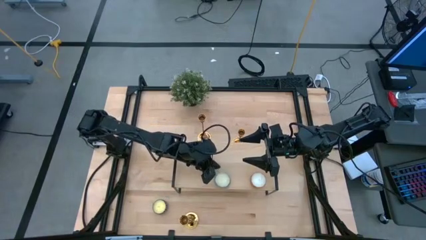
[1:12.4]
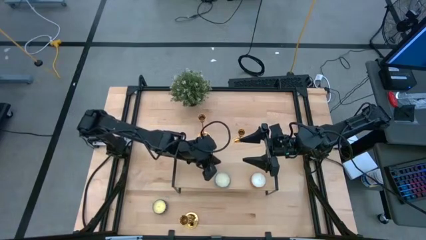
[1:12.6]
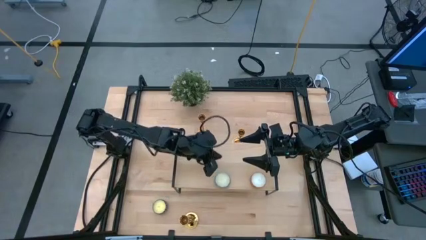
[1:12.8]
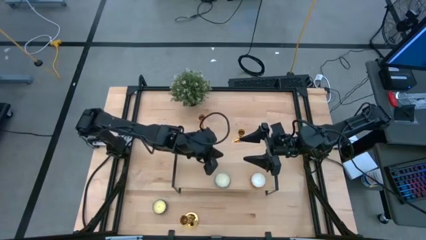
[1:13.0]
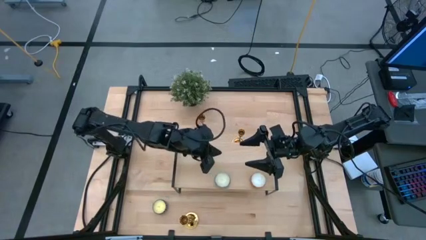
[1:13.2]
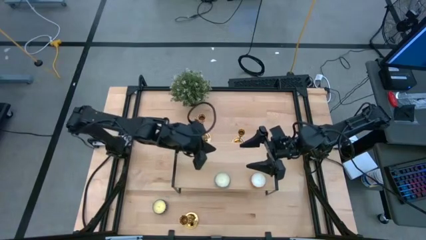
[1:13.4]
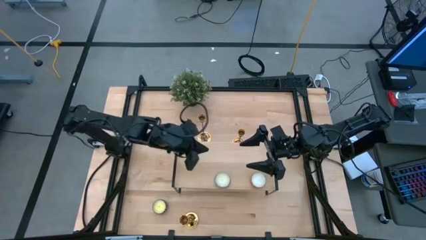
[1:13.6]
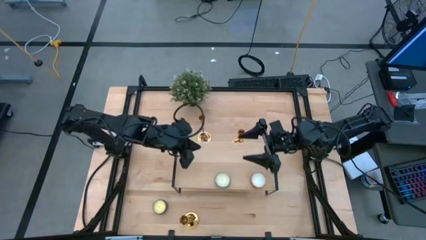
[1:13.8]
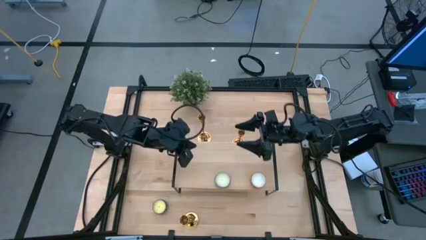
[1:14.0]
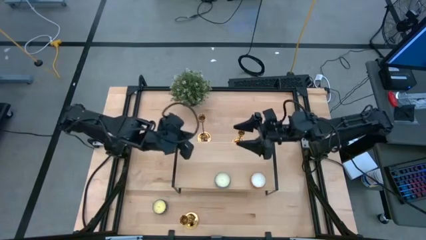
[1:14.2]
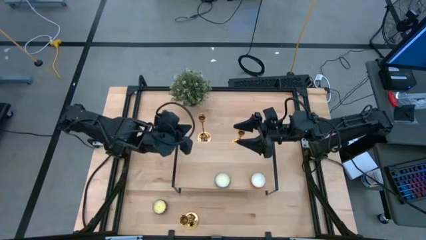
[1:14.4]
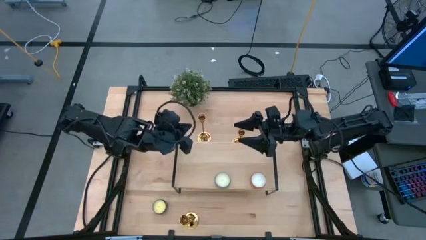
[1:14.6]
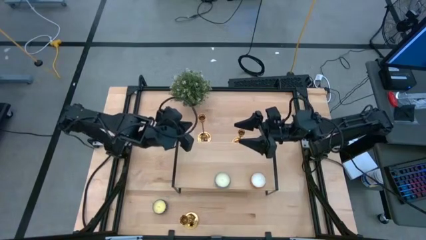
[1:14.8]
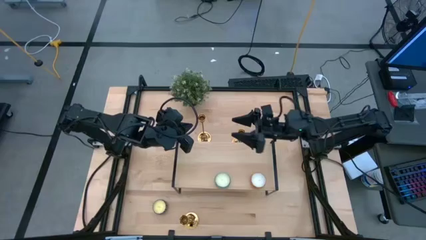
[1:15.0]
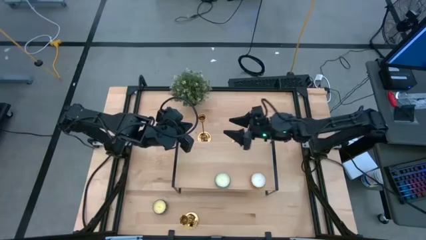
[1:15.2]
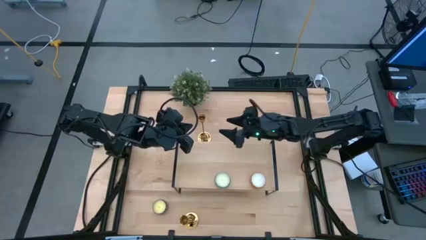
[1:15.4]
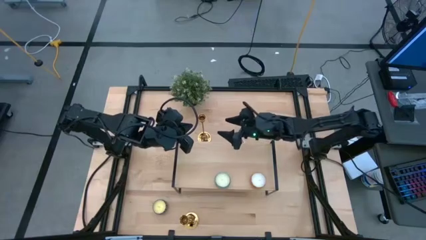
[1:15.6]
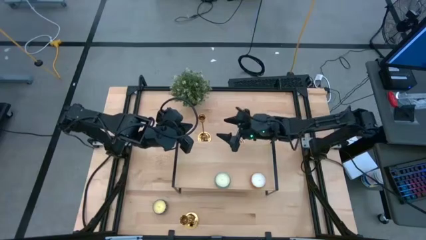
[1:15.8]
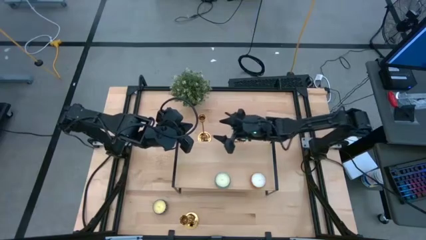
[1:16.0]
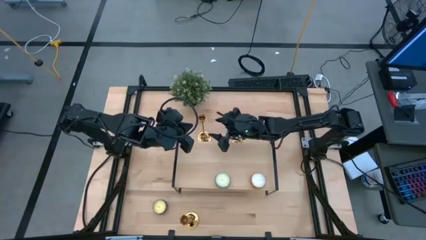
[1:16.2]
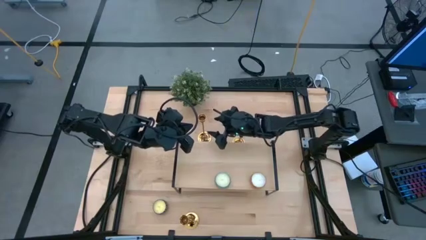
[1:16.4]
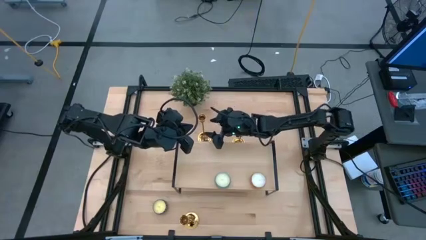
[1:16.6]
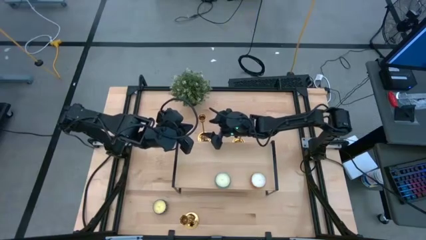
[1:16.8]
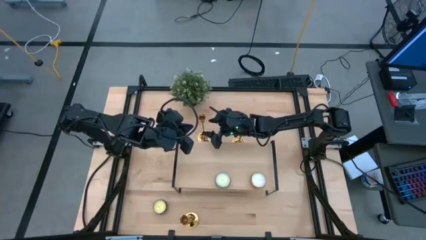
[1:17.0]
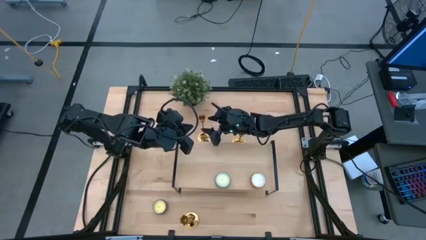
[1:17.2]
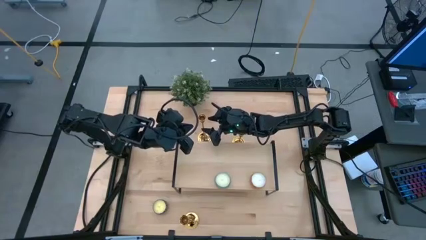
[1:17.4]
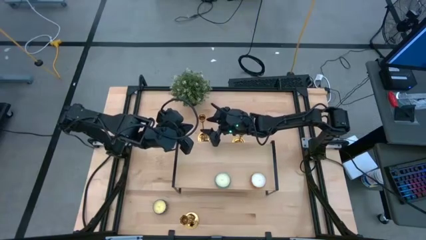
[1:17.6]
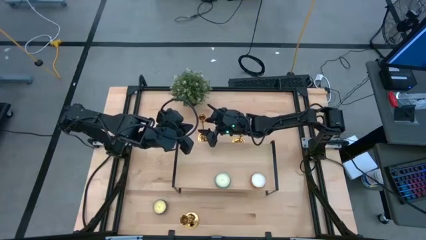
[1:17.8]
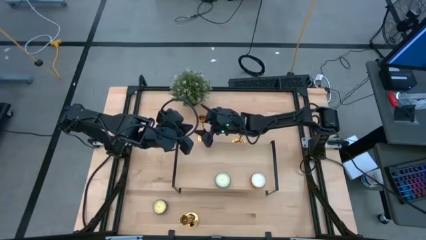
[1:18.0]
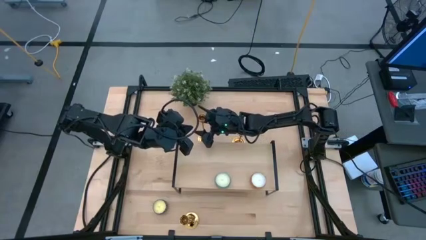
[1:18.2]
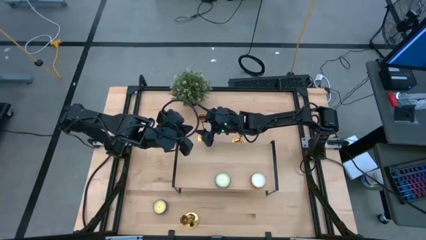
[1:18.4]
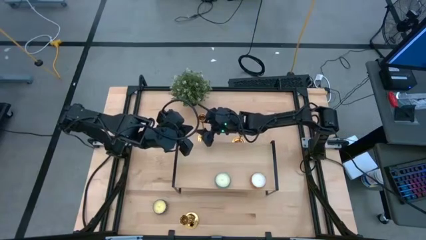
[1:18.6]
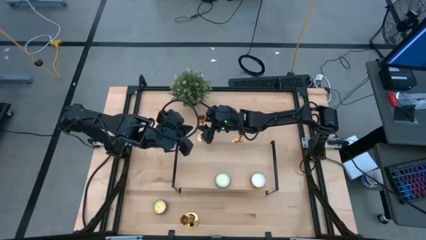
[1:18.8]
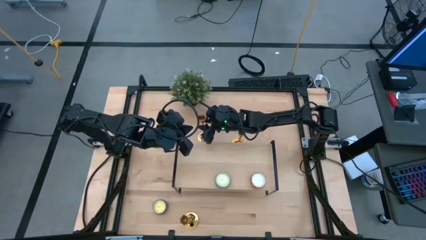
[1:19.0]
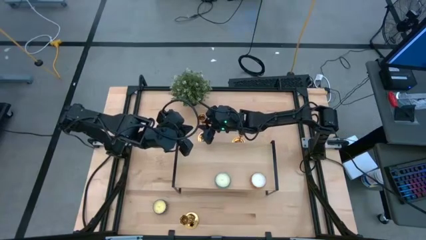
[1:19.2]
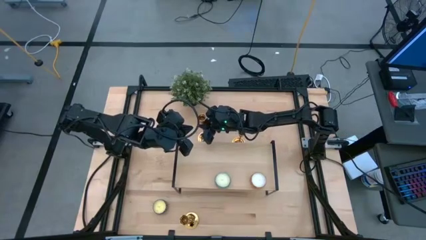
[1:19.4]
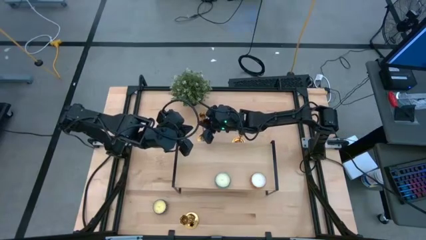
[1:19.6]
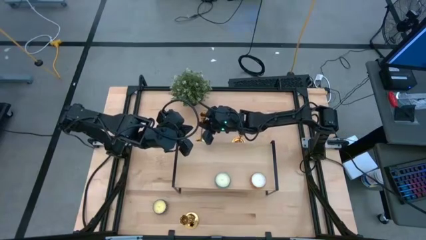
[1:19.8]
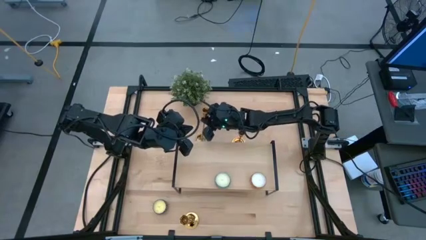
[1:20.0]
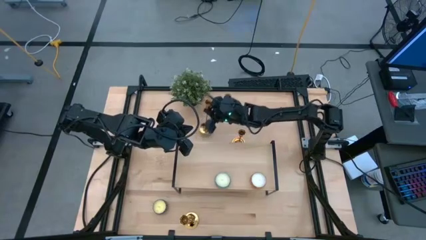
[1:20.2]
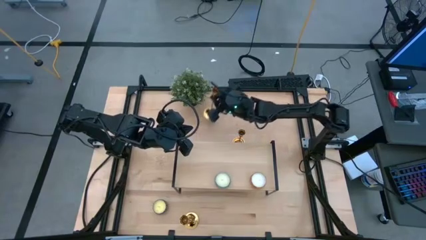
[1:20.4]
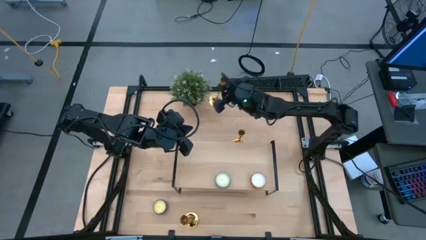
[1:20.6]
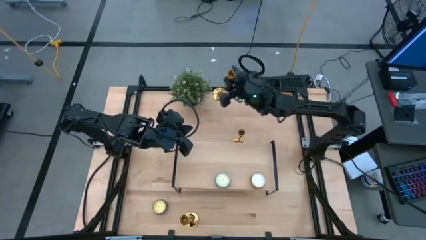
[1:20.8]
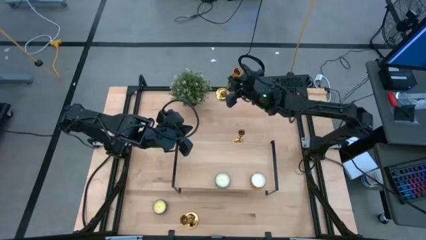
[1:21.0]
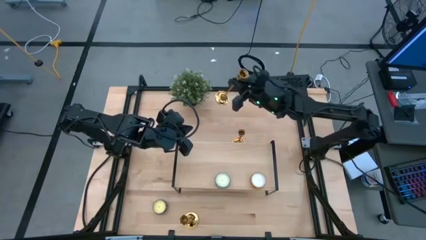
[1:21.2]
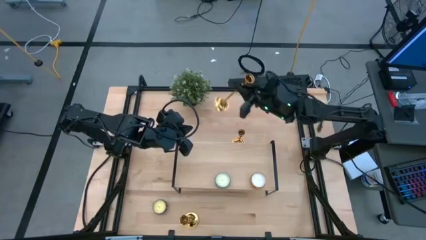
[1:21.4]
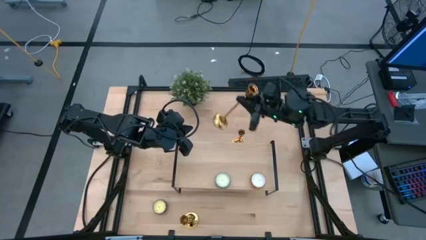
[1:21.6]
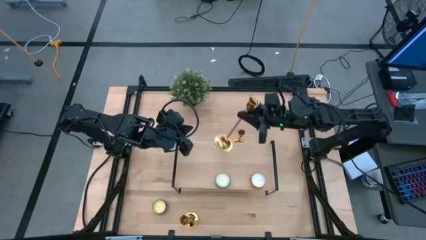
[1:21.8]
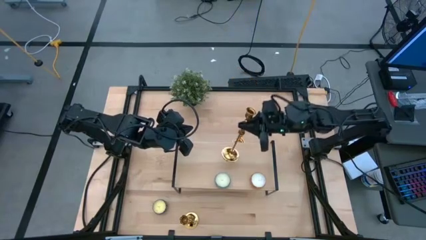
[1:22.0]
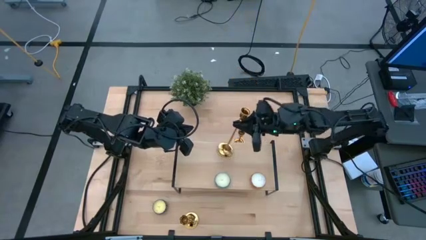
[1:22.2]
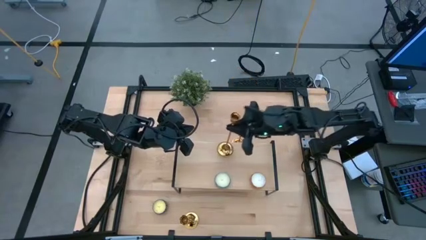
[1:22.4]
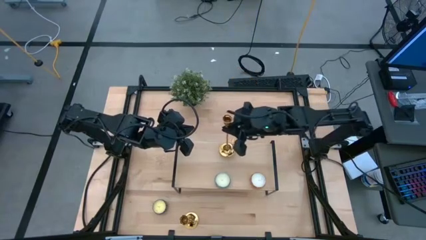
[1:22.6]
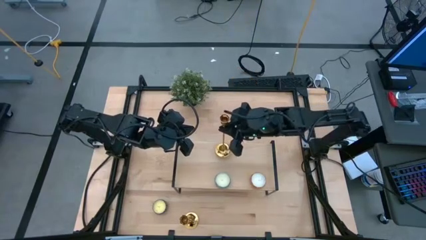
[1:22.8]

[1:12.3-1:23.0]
Task: Pick & Place candle stick holders
Put the top left candle holder on the shelf

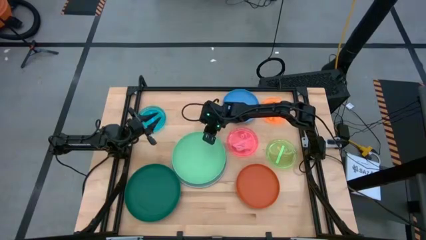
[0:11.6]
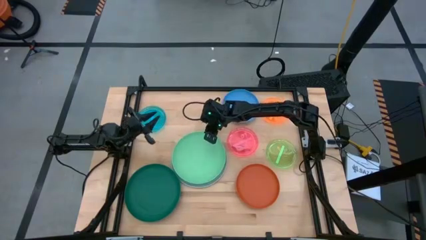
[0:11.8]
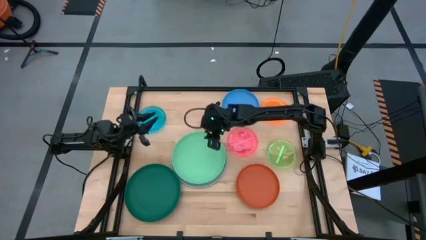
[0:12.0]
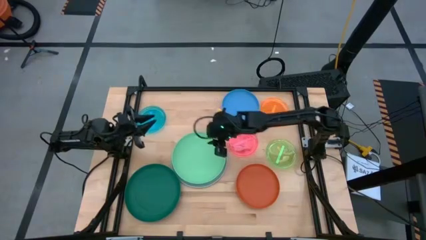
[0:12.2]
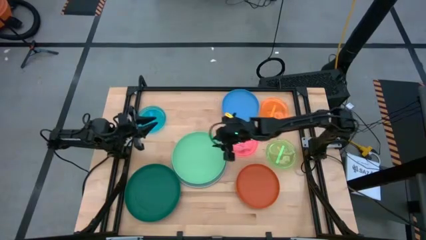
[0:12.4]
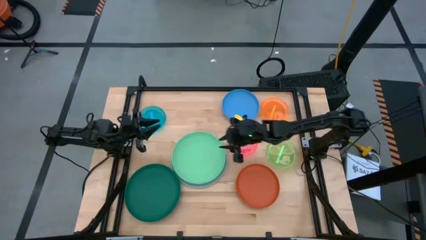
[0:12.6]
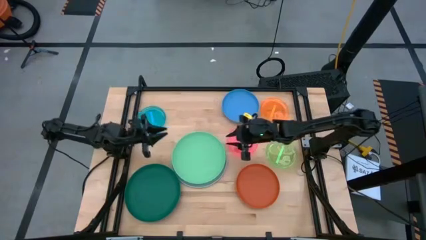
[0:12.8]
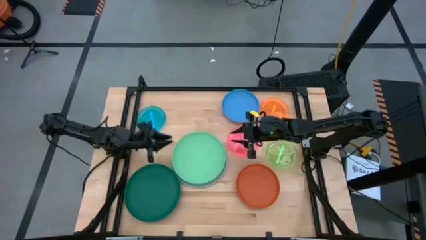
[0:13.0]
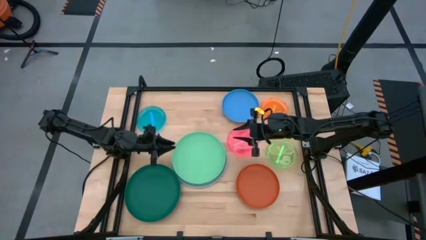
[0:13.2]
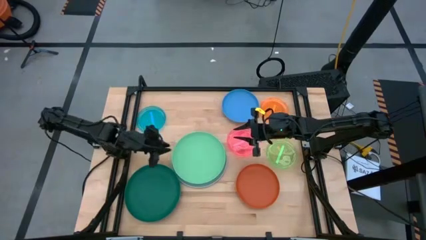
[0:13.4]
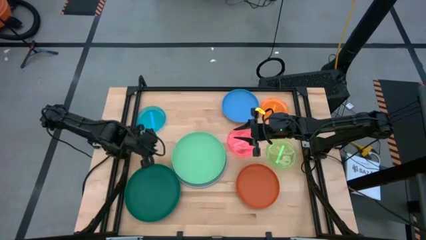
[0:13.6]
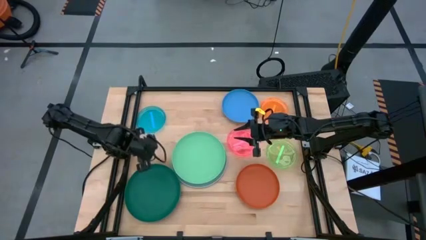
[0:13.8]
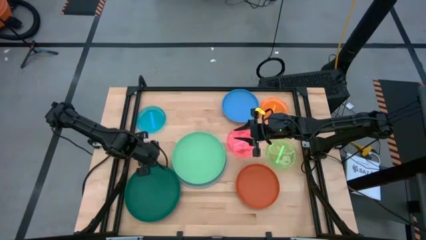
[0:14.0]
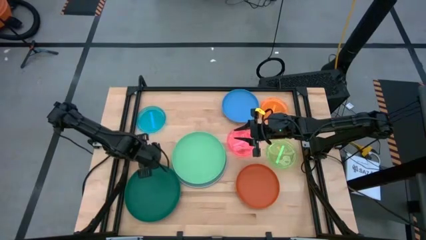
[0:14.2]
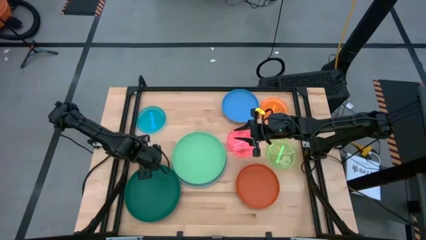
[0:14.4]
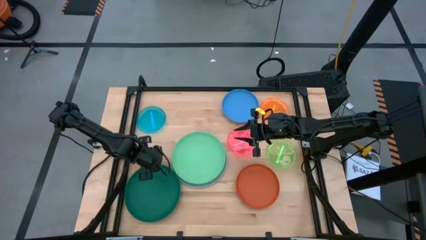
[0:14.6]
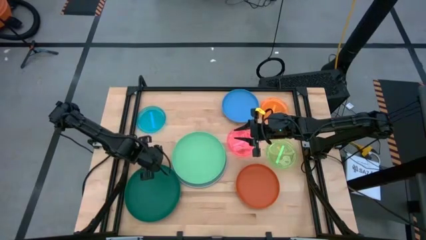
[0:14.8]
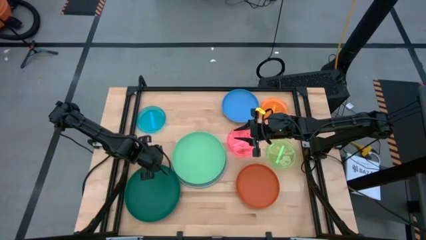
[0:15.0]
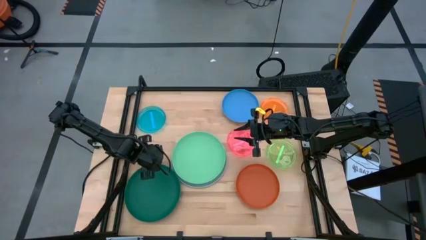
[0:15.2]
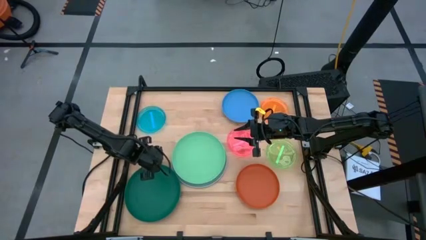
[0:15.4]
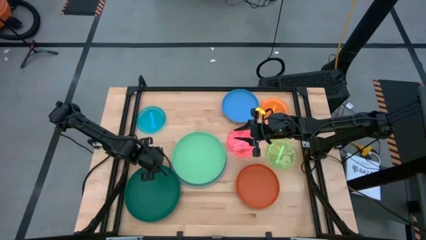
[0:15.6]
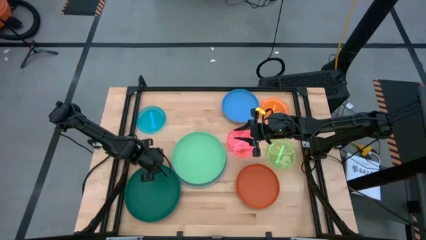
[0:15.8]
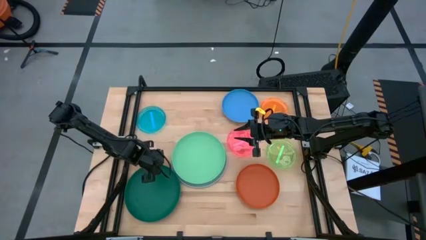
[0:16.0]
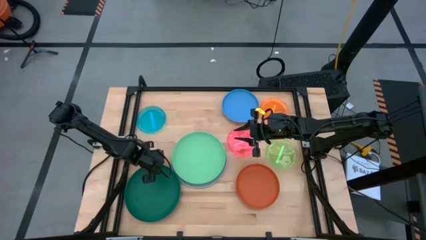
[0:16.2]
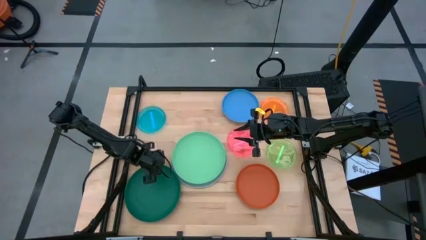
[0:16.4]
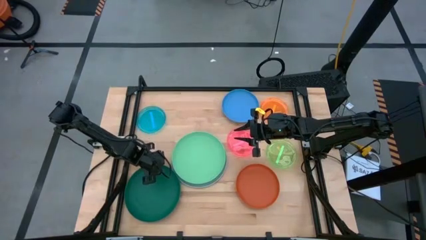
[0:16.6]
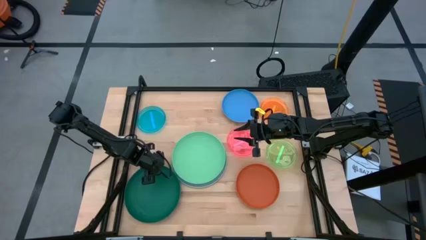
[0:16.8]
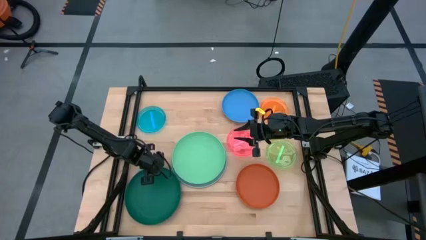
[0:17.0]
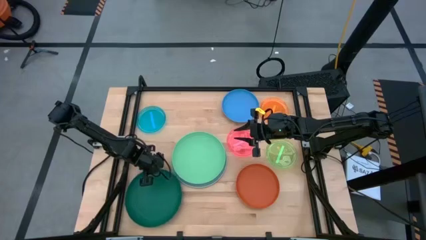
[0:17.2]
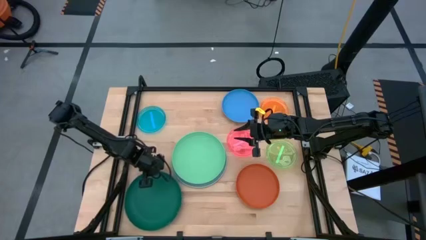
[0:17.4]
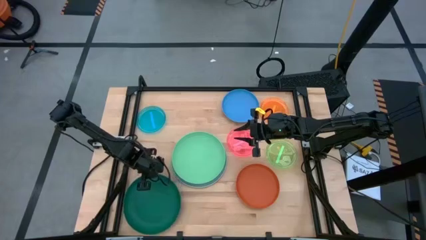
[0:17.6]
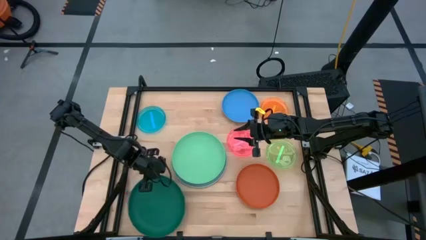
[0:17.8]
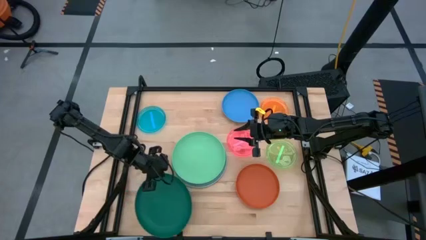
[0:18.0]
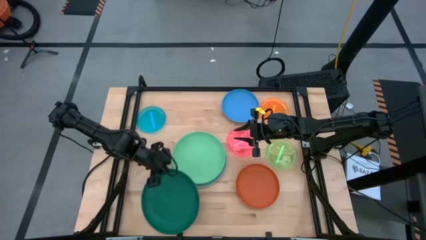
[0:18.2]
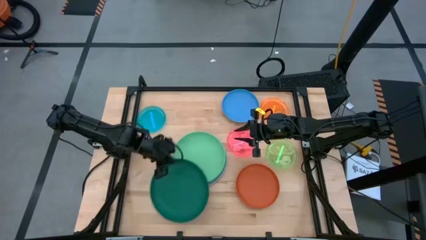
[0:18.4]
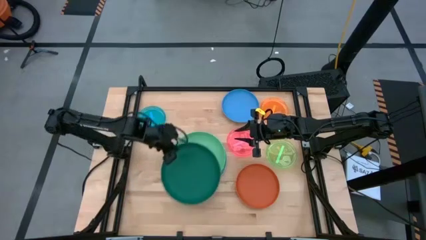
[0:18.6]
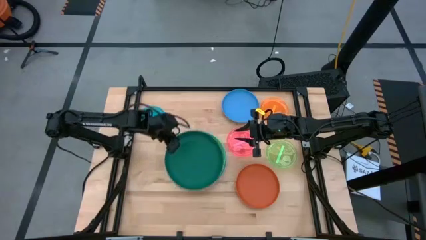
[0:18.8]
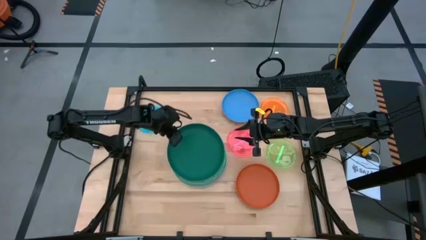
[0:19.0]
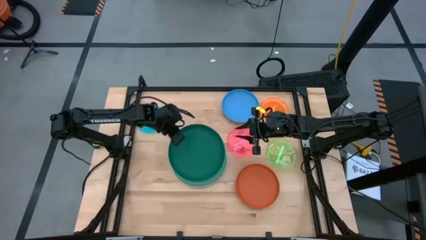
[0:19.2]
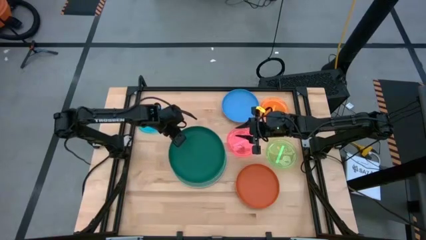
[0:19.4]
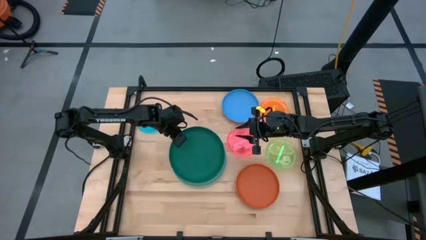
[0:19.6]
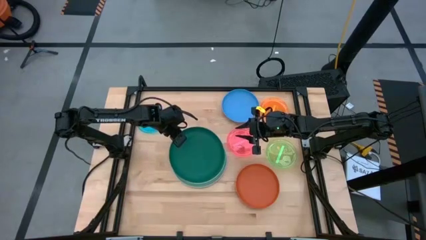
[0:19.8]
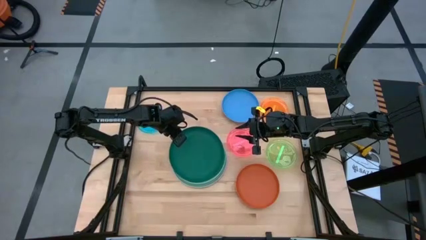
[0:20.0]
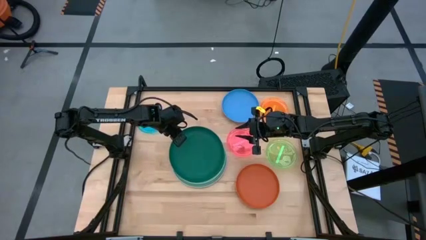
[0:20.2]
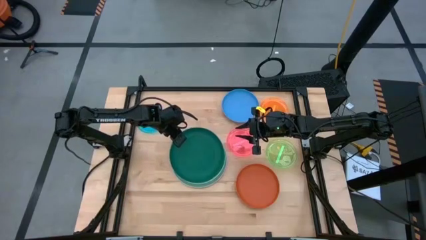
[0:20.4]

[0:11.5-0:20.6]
Task: Stack plastic plates
Stack the dark green plate on top of the green plate
